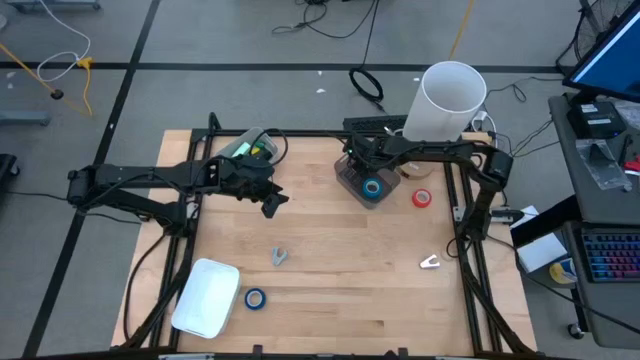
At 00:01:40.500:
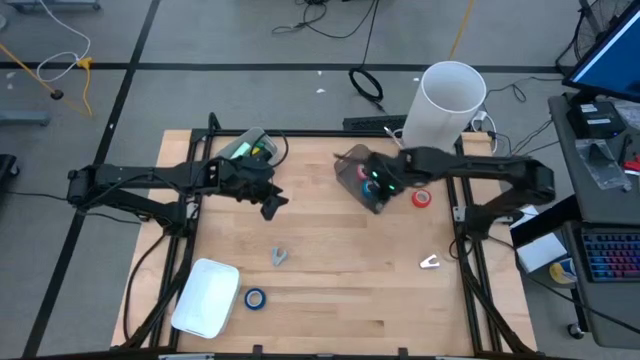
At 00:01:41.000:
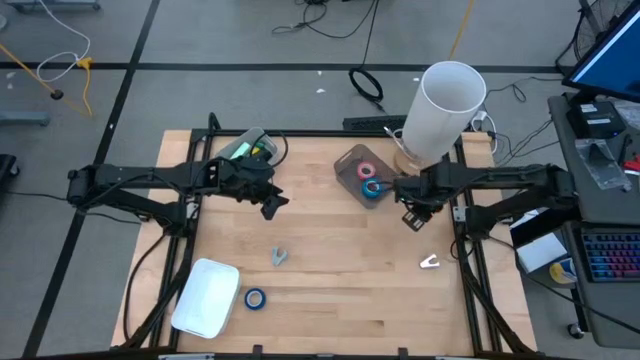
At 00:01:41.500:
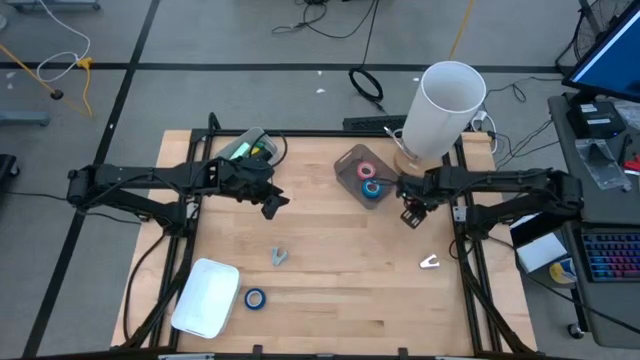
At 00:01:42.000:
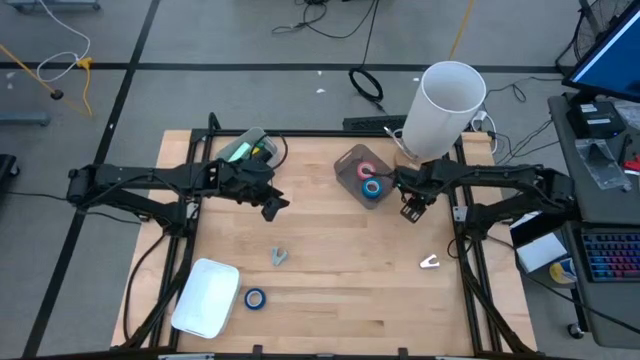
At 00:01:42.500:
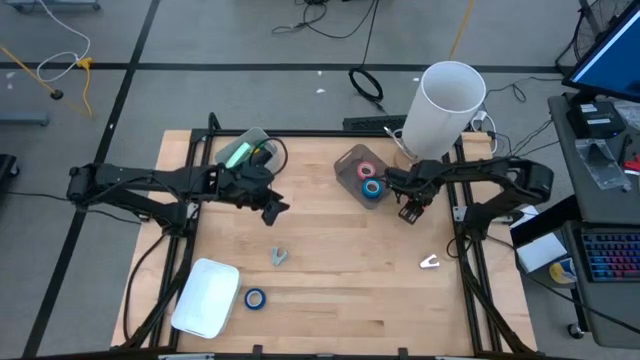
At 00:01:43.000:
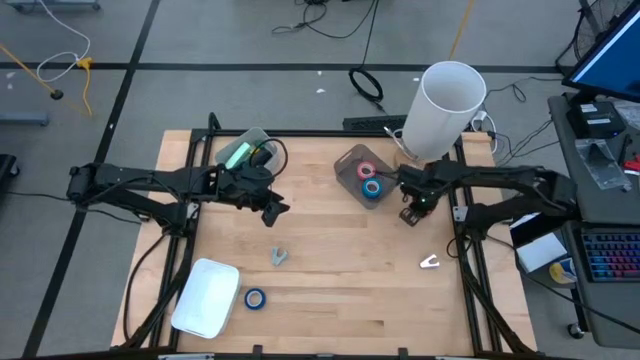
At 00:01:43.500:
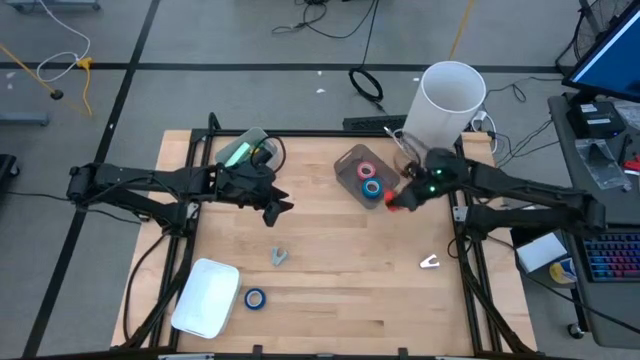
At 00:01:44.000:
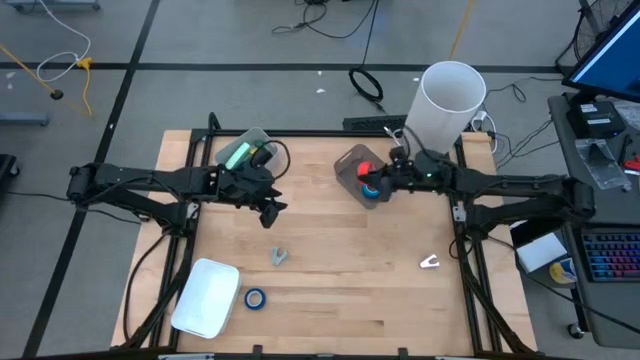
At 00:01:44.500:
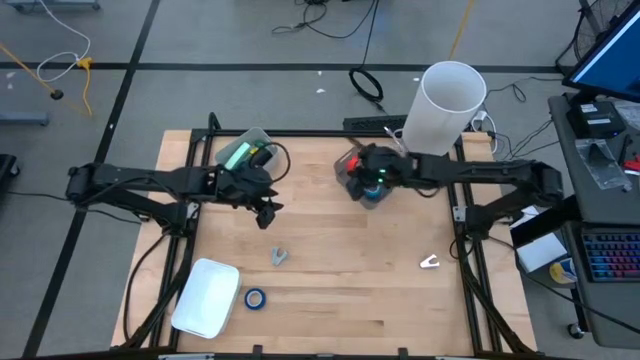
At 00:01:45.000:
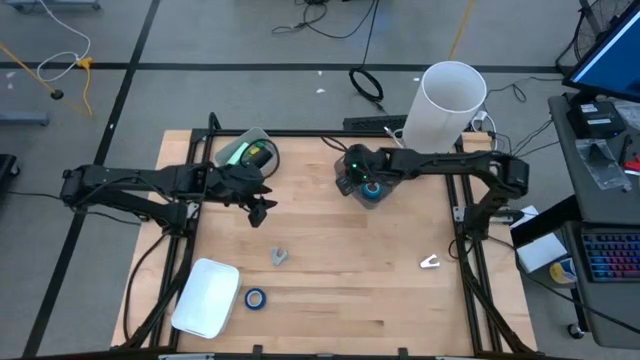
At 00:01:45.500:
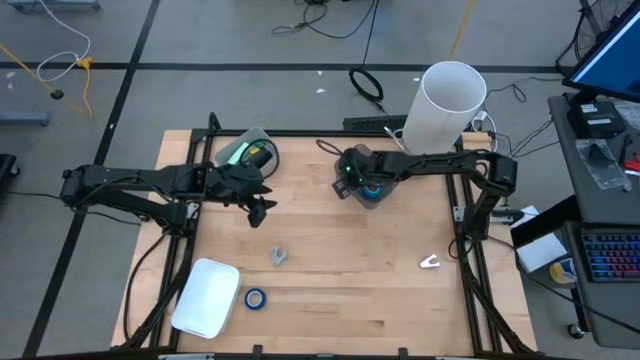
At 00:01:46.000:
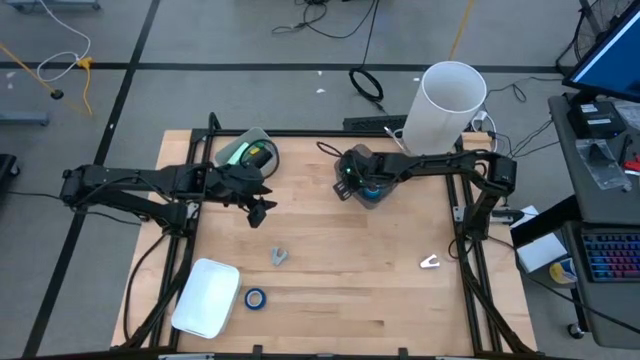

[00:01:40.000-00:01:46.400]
Task: Pick and place Stapler, Stapler remover, tape
Put the orange tape into the black bin

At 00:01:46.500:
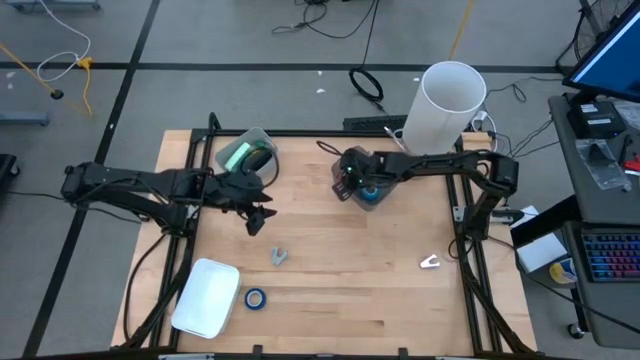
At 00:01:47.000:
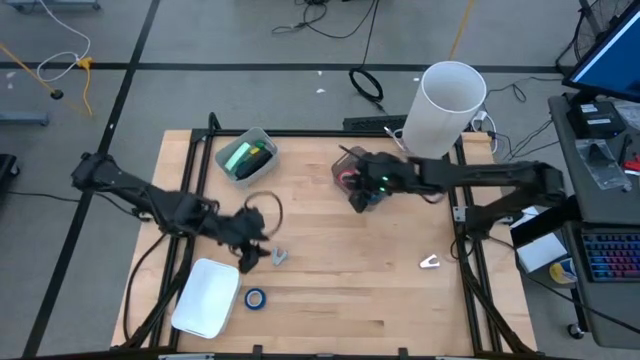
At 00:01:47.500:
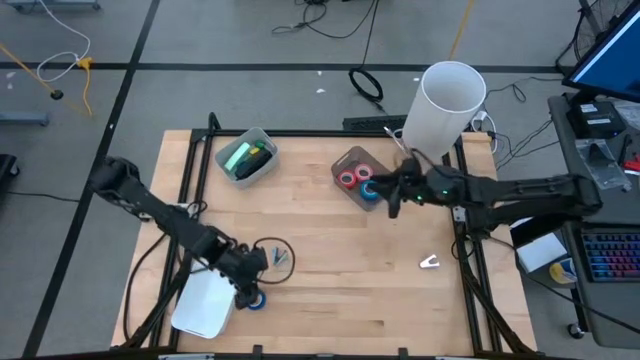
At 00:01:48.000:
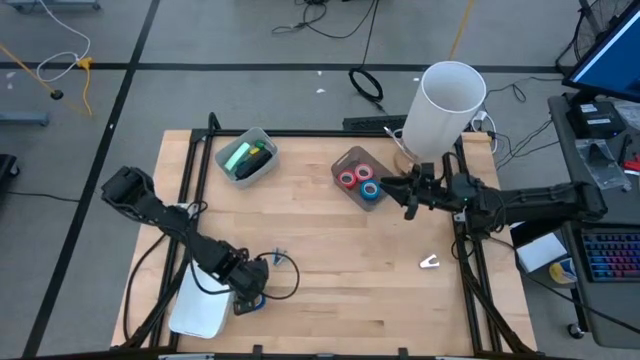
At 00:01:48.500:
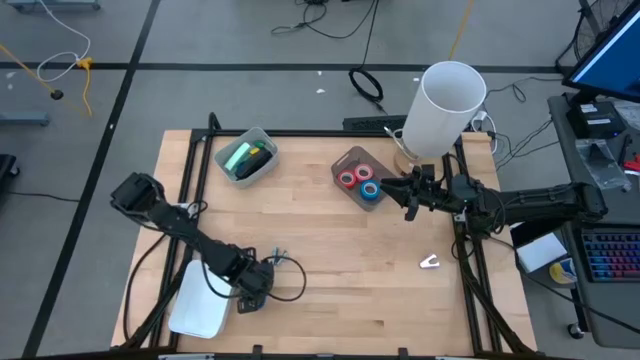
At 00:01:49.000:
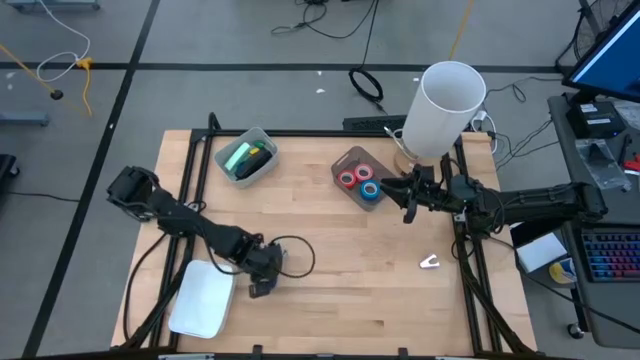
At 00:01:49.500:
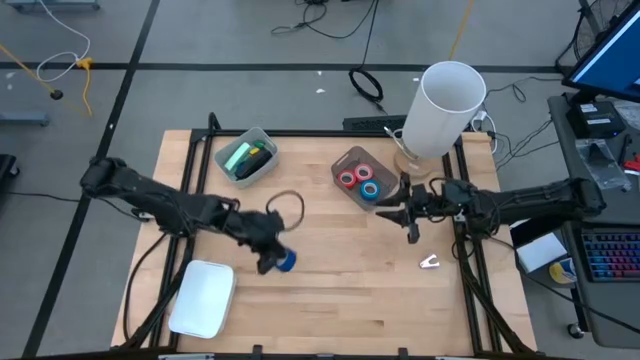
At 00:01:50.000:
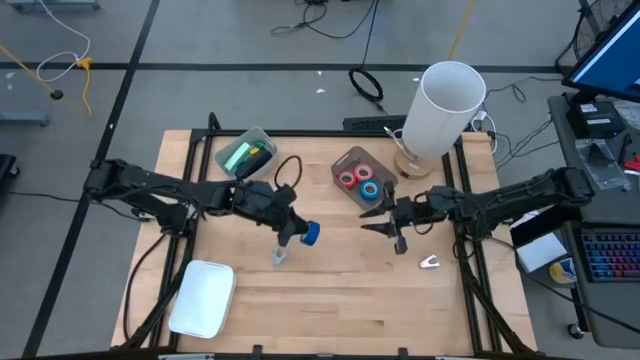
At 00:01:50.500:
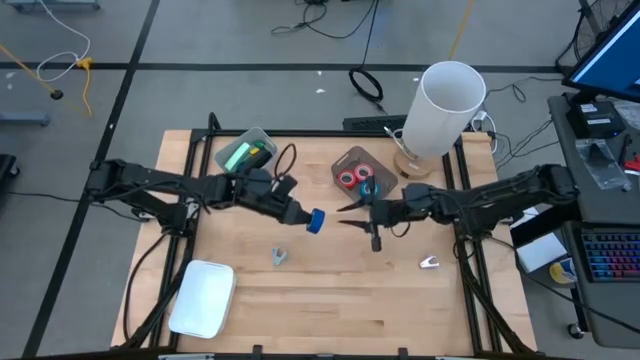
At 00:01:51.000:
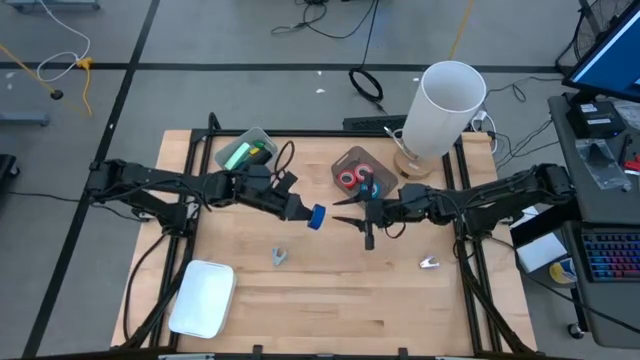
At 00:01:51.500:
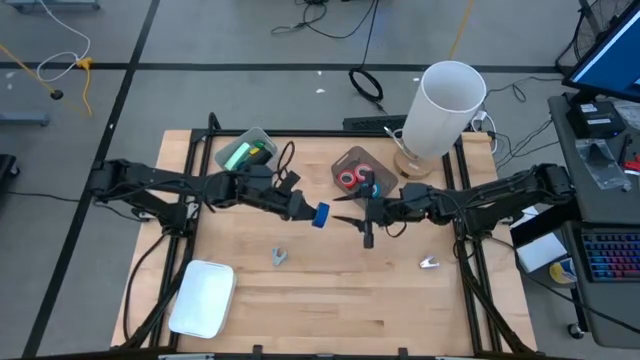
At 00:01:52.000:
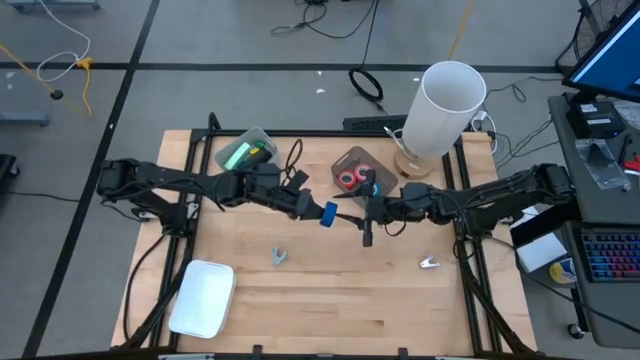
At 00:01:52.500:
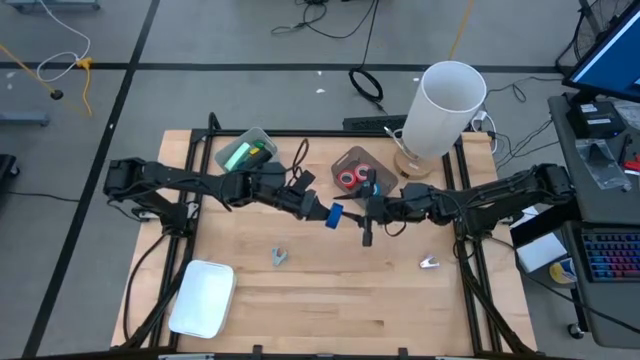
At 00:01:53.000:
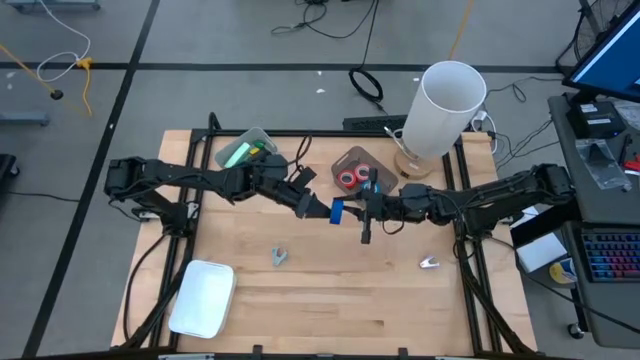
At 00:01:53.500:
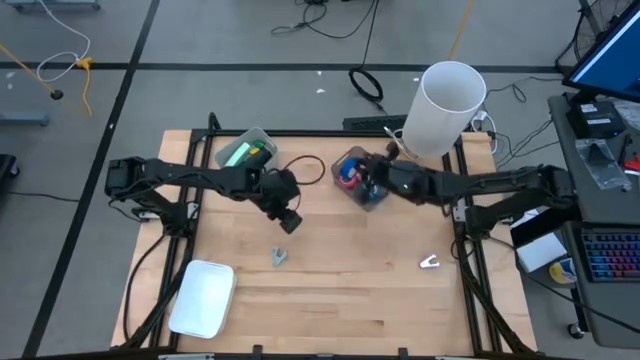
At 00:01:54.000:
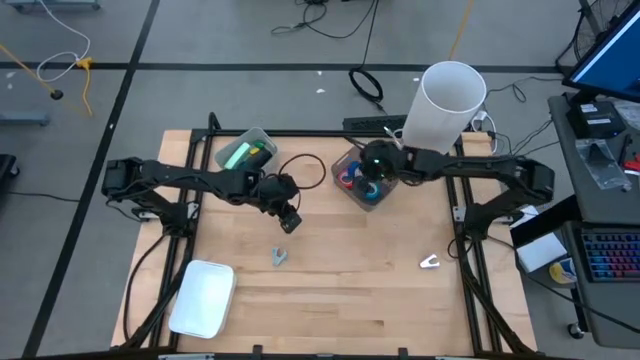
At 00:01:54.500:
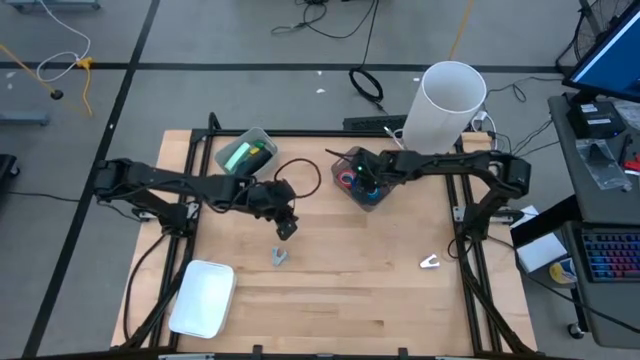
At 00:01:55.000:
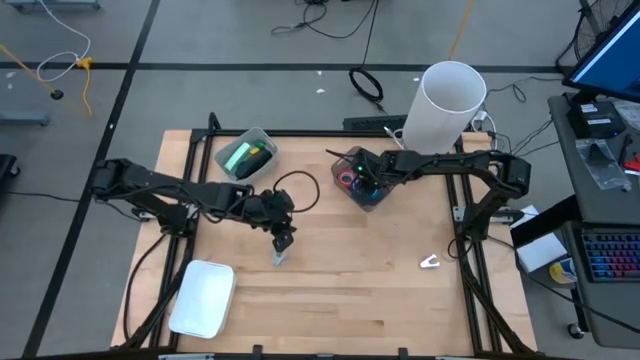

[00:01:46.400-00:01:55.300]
Put the blue tape into the black bin

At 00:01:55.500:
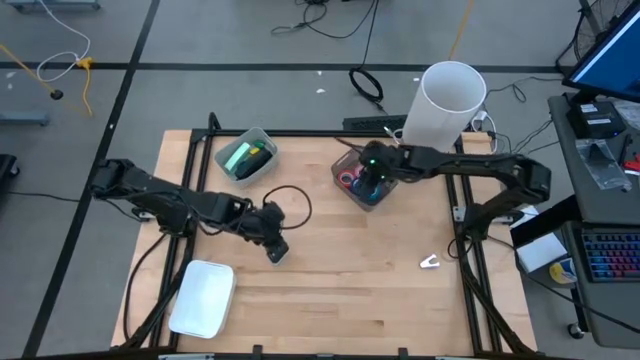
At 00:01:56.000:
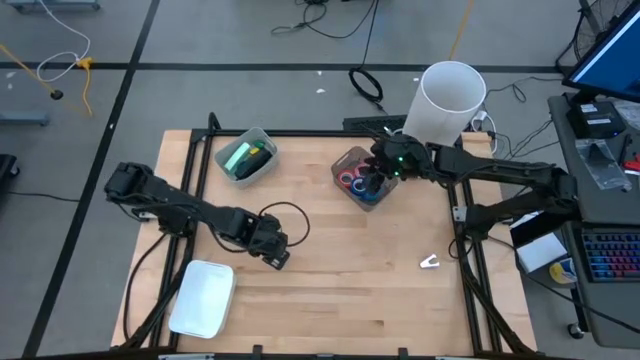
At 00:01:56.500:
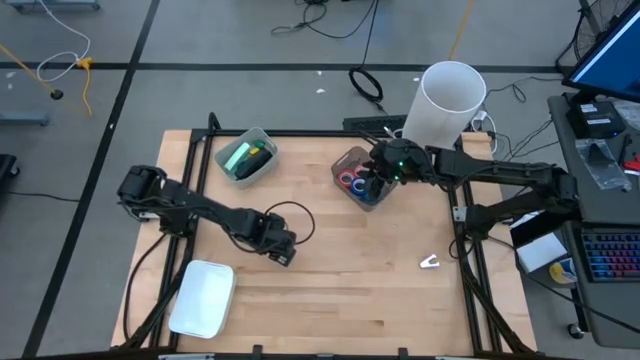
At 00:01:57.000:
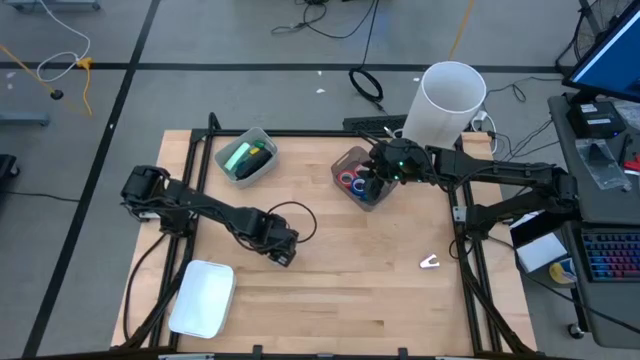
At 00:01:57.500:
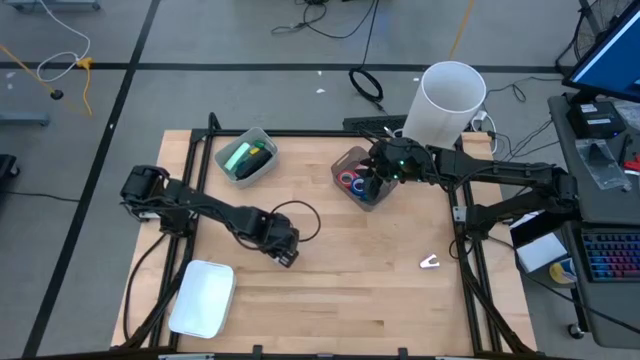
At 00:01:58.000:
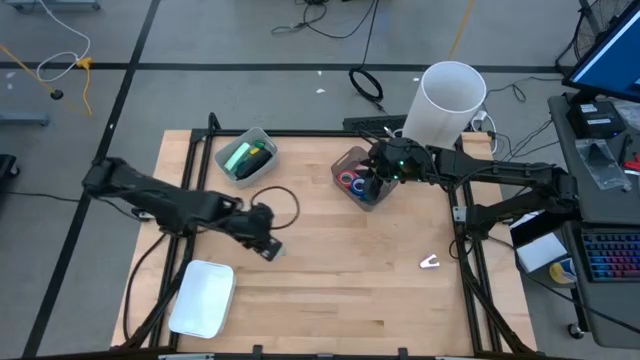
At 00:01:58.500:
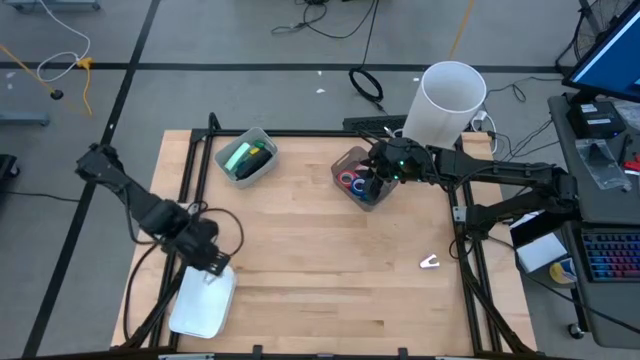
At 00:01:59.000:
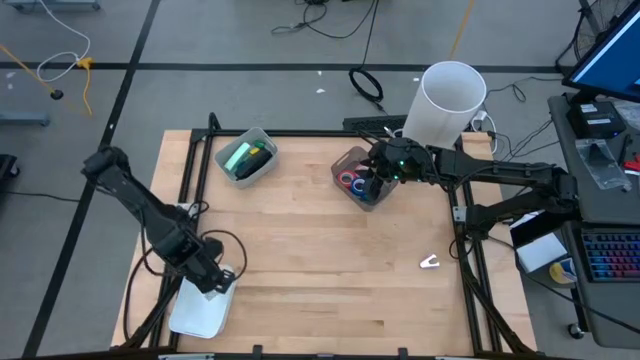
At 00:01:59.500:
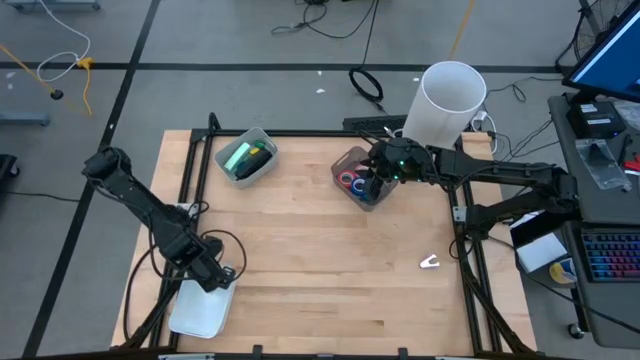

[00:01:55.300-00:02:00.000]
Put the blue staple remover into the white bin

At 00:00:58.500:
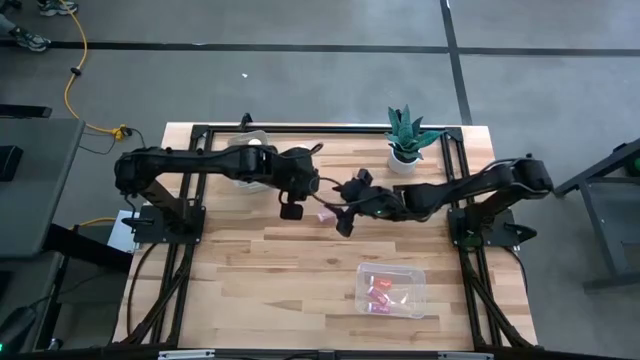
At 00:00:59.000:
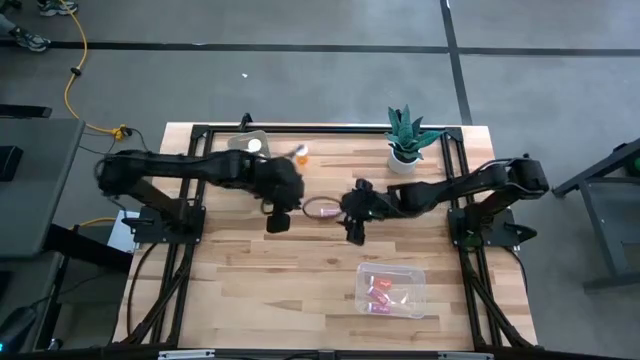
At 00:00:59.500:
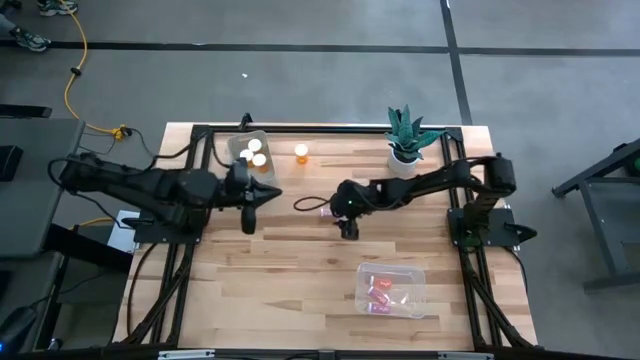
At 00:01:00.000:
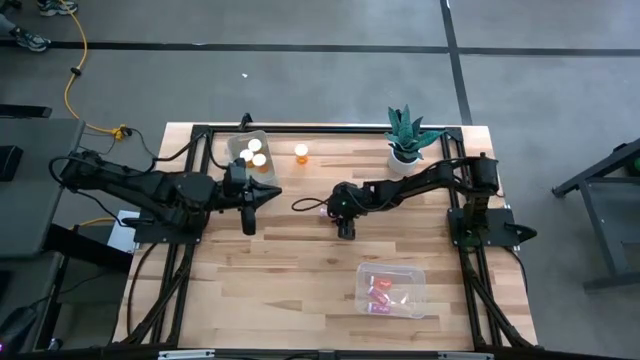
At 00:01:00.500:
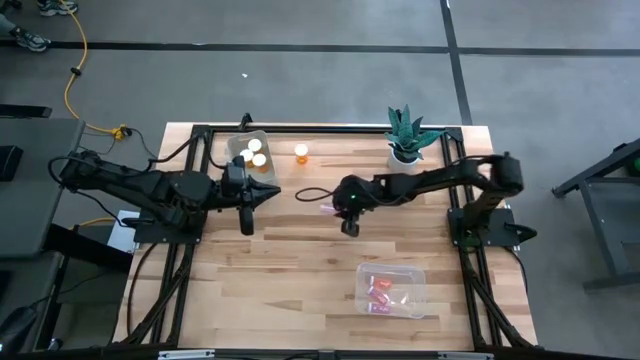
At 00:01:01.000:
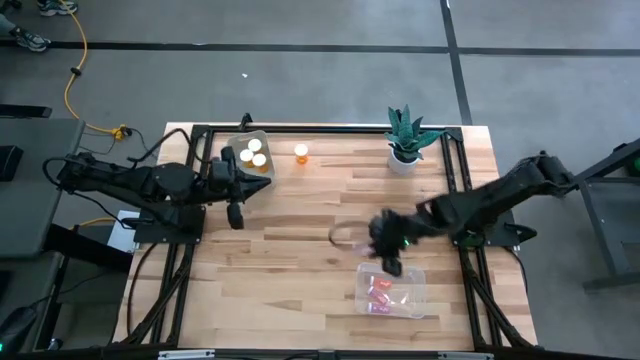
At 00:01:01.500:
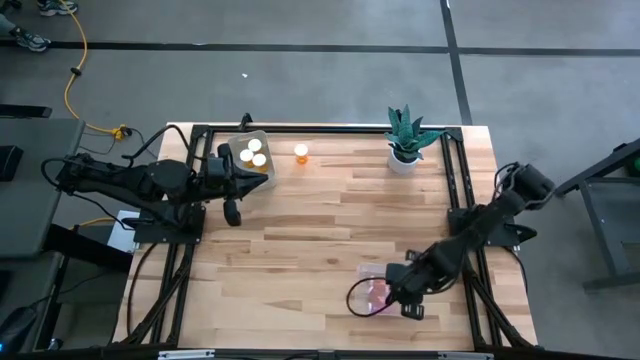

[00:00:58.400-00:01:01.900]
Task: Pick and place medicine bottles into bin by pill shape (circle, oval)
Put the small pink pill bottle into the transparent bin
